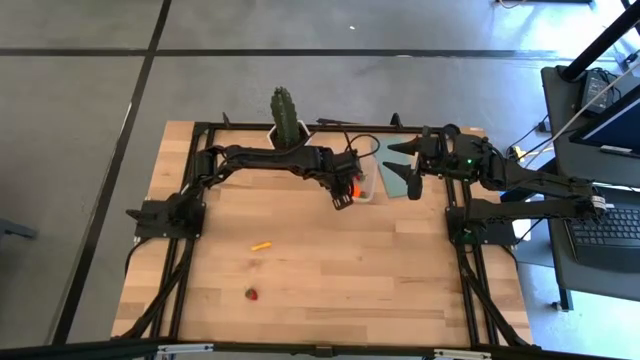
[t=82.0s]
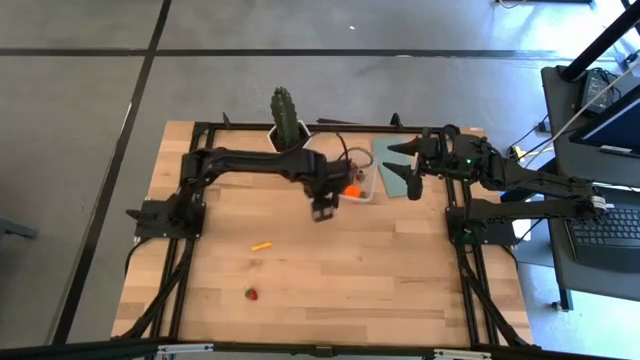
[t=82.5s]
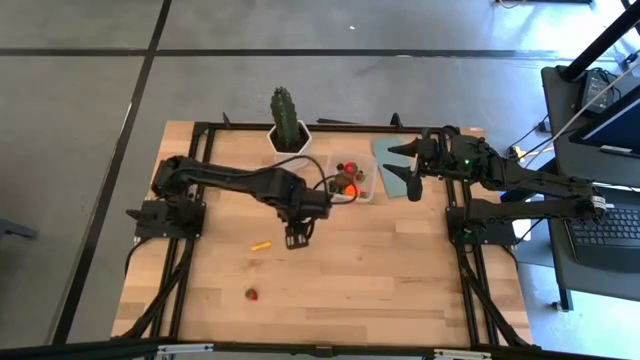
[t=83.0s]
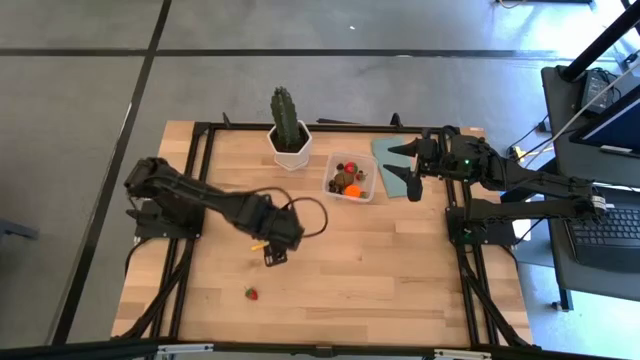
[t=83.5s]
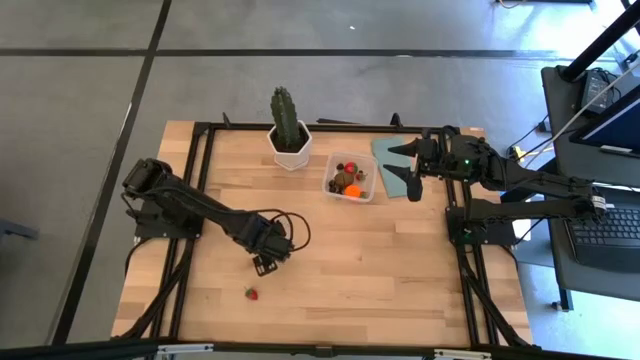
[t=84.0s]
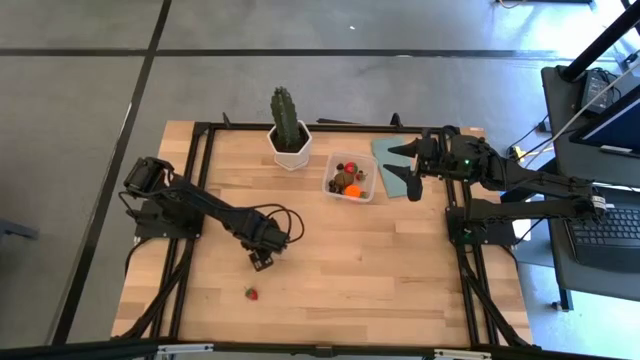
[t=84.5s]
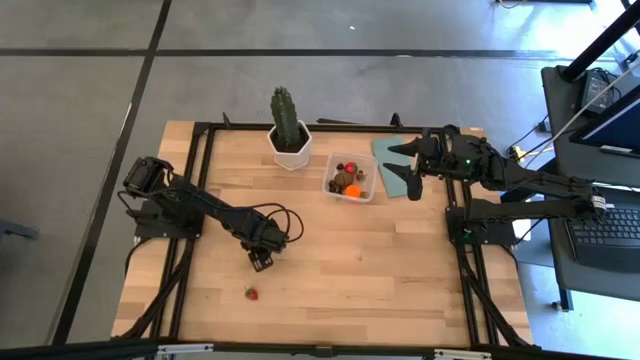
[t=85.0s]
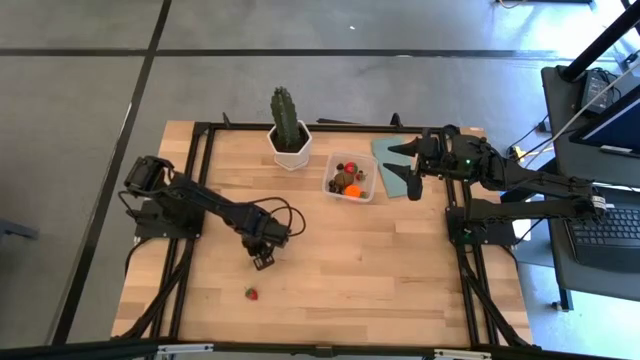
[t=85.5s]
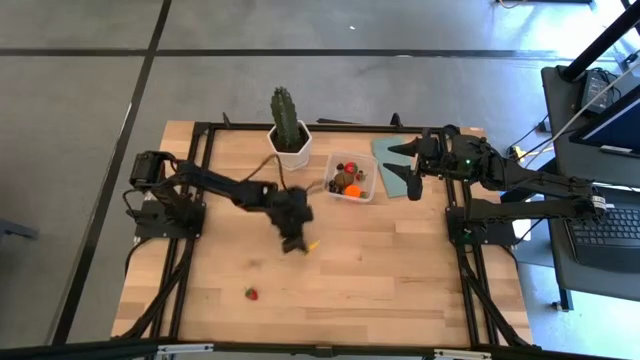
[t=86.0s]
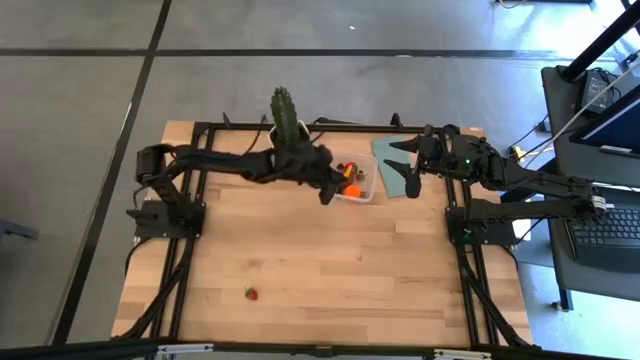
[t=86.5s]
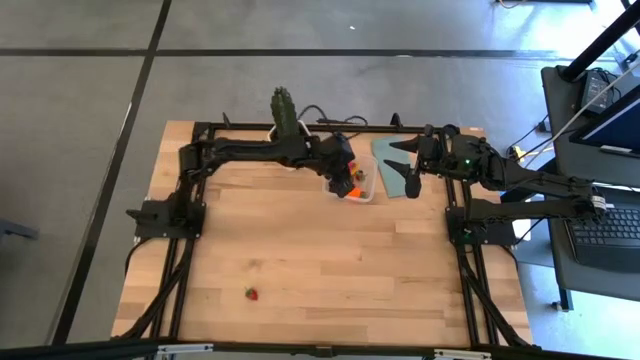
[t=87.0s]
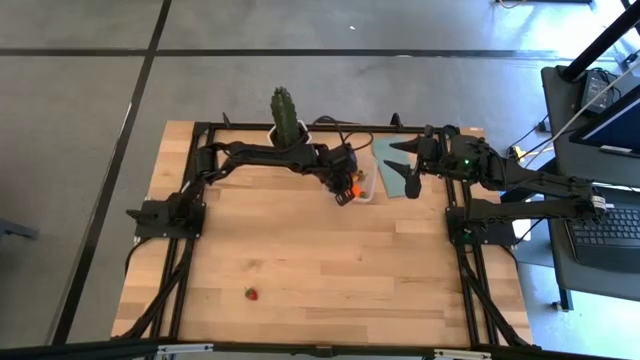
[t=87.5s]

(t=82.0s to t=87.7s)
Task: Pick and placing Produce into tupperware
Put the corn into the transparent bin

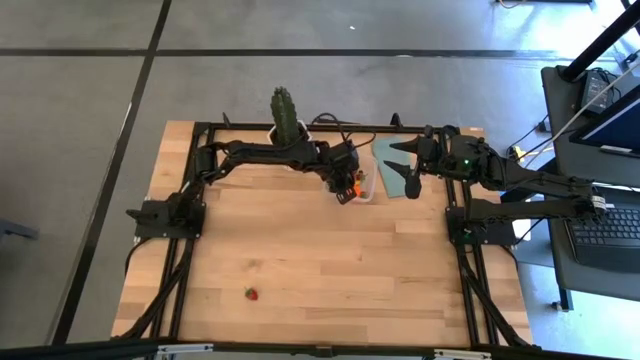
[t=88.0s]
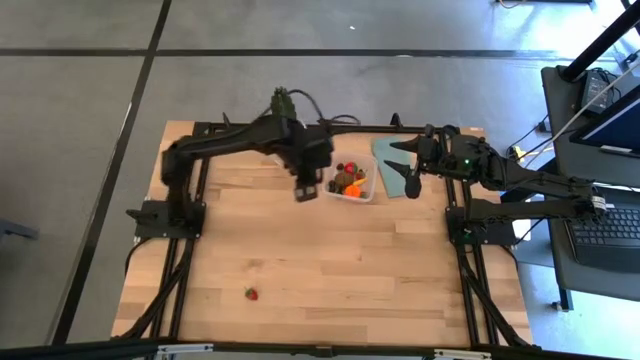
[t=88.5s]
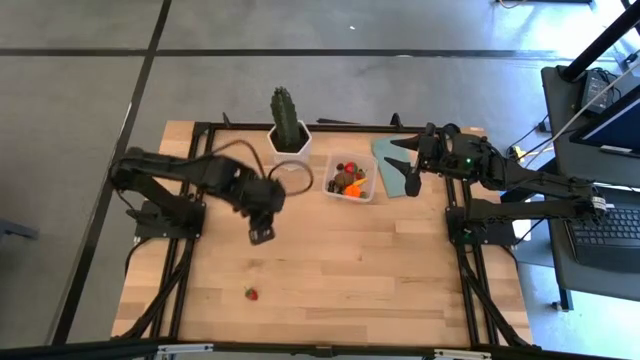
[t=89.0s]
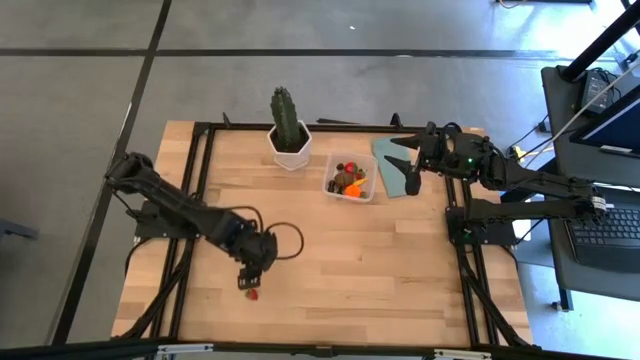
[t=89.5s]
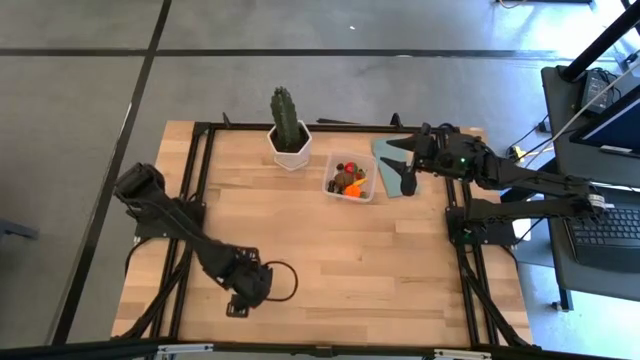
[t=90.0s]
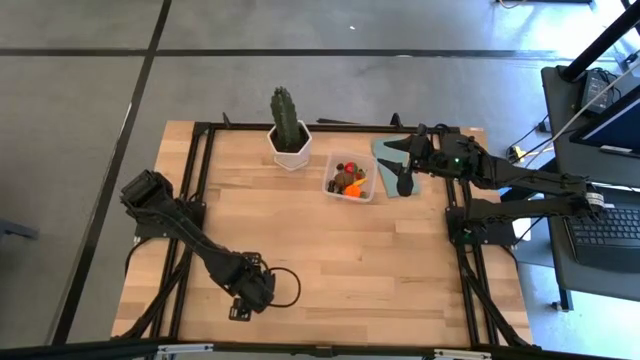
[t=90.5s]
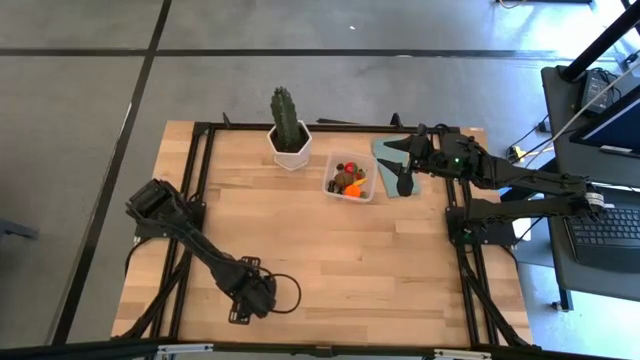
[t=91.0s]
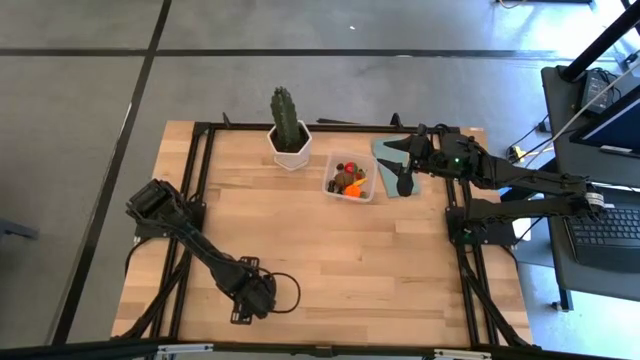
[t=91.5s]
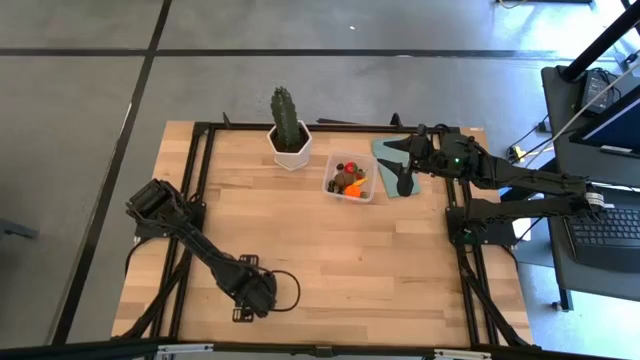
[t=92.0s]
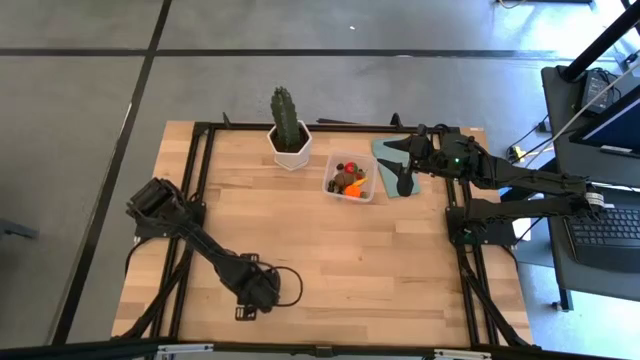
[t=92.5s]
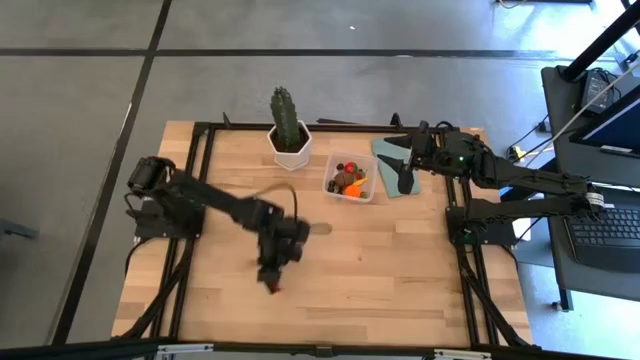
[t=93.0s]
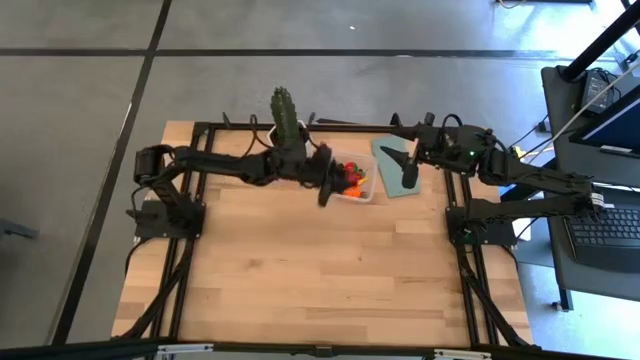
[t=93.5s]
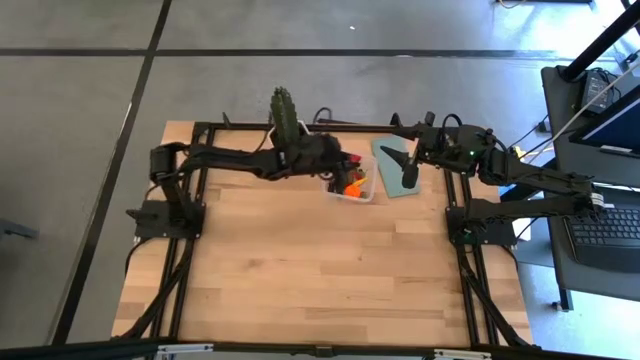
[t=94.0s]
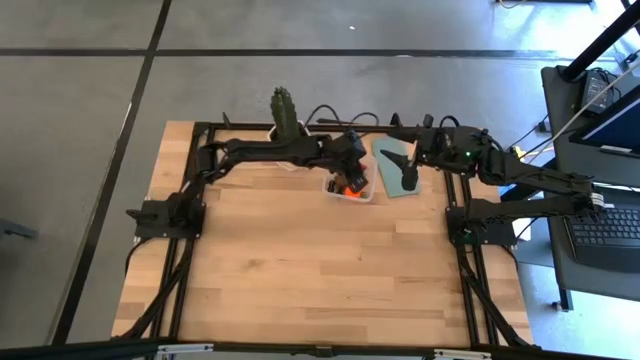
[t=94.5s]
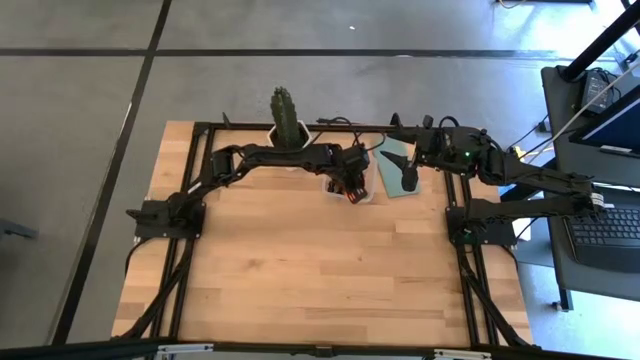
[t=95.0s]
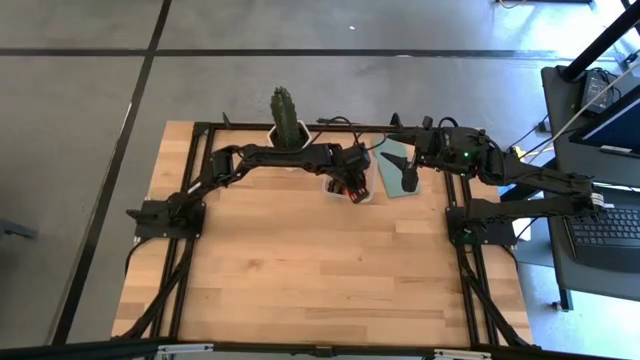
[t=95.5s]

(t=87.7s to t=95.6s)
Put the strawberry into the transparent bin

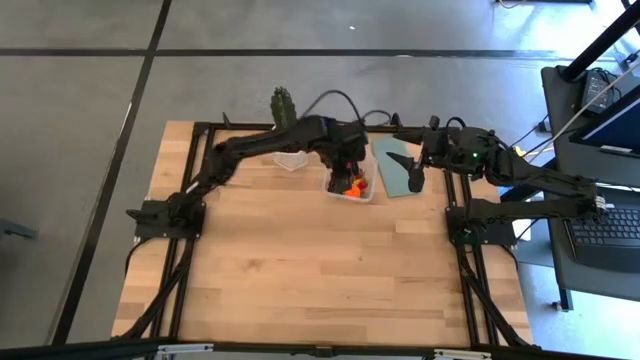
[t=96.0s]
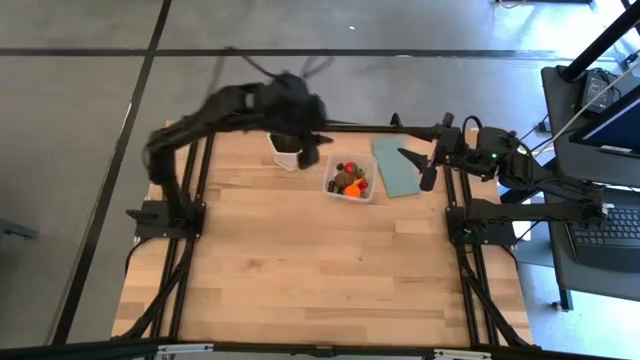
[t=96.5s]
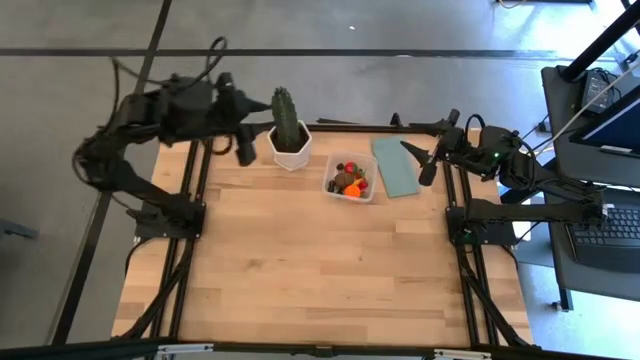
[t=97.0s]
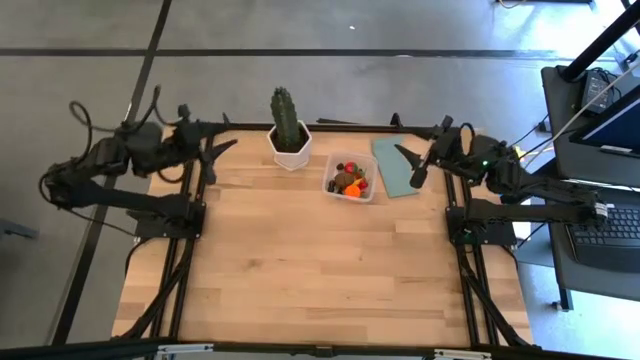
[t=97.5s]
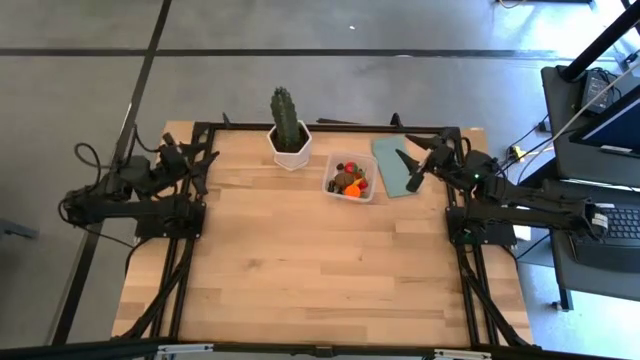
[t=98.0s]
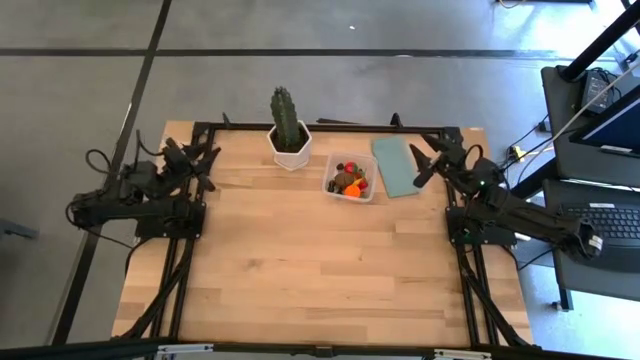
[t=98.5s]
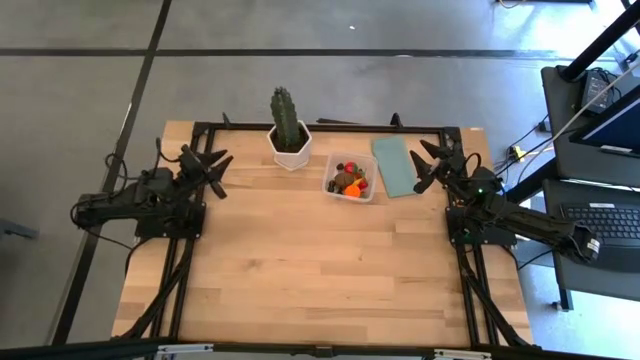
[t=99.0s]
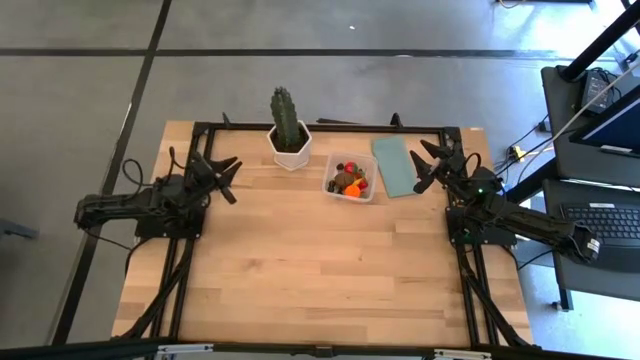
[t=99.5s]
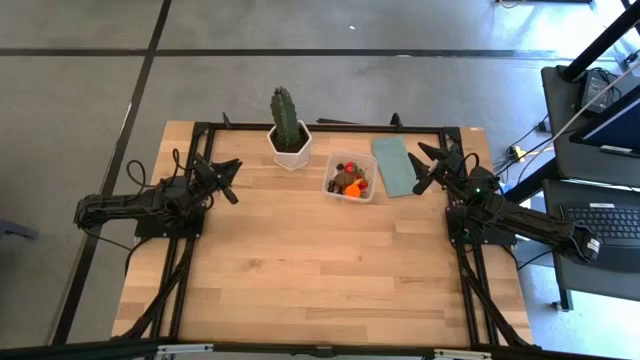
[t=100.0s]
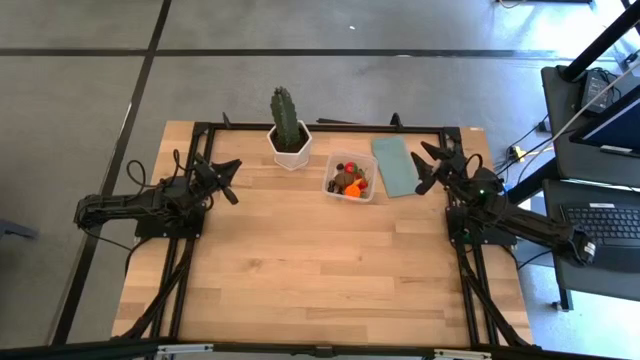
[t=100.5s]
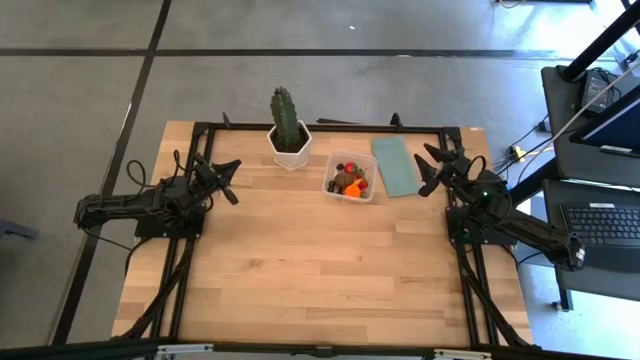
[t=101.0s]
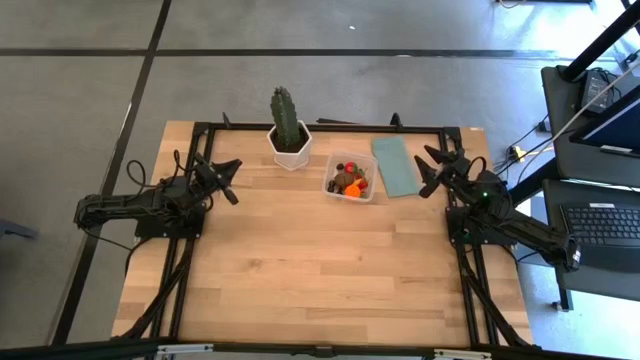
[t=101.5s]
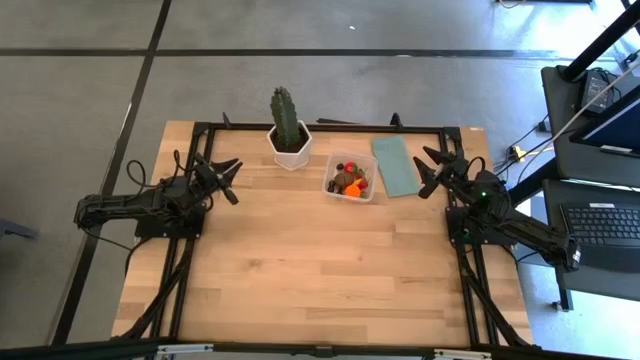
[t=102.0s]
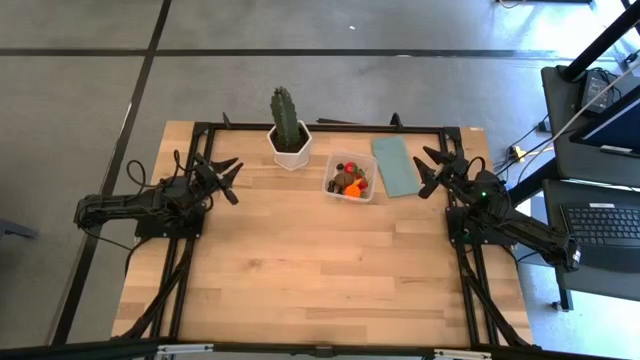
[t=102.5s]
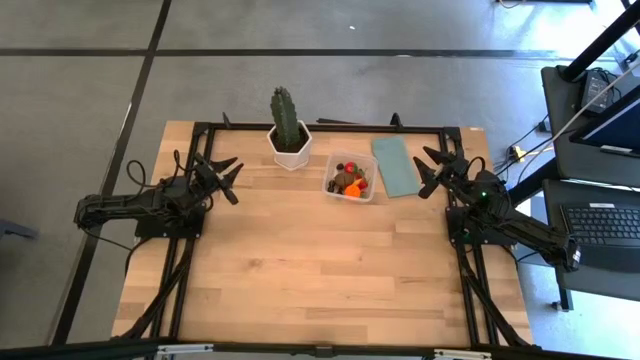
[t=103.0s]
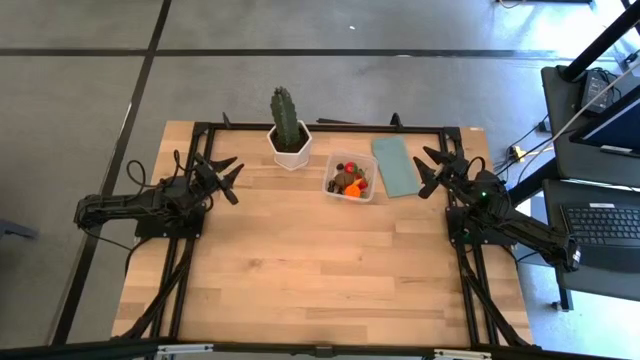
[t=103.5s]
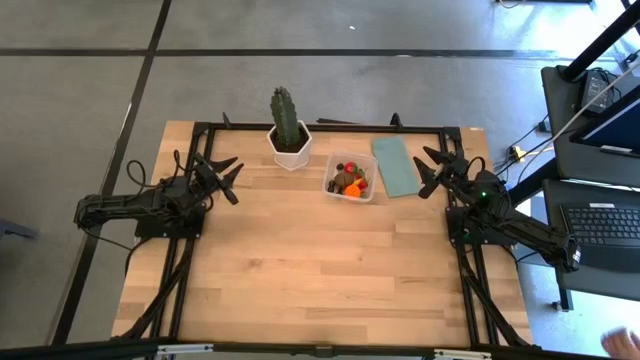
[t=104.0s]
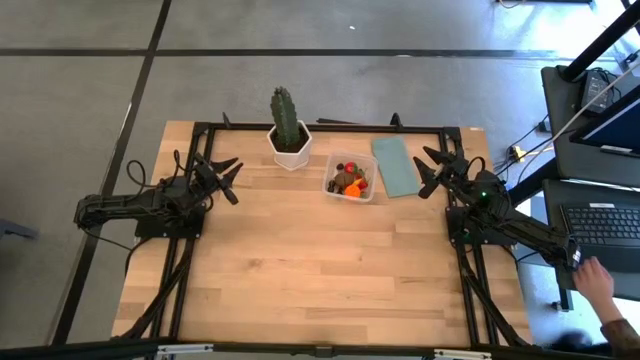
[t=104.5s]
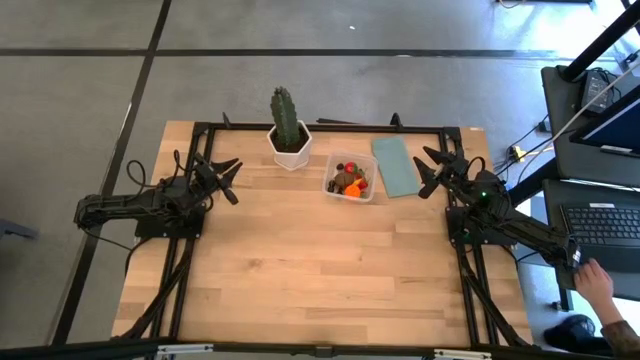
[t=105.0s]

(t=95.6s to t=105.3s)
Return to Home Position
